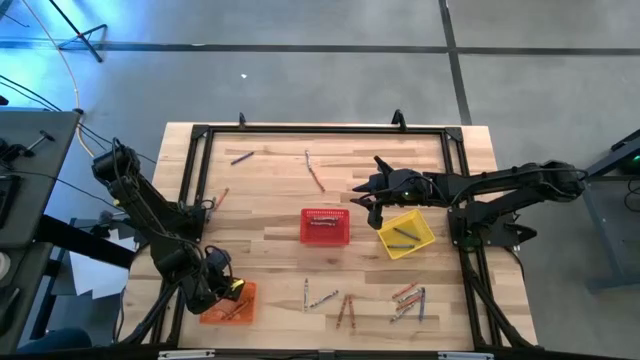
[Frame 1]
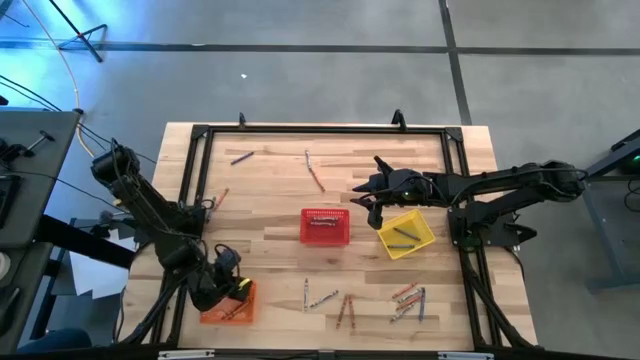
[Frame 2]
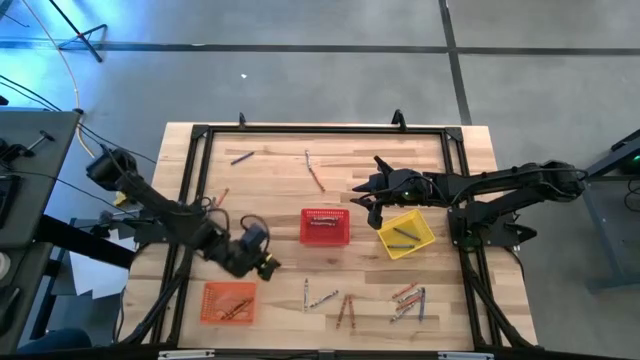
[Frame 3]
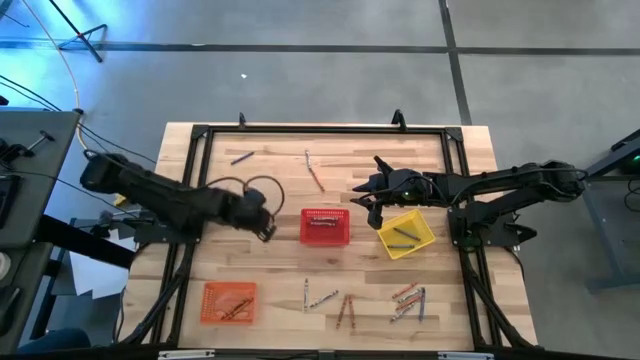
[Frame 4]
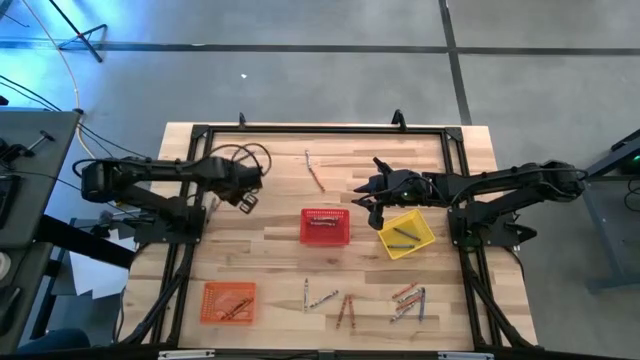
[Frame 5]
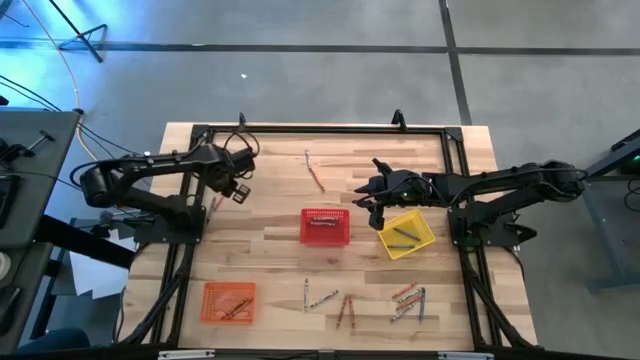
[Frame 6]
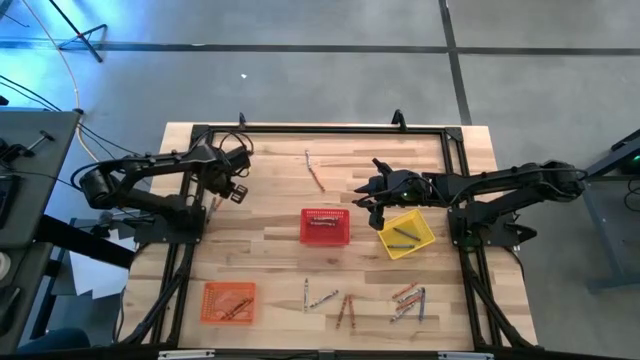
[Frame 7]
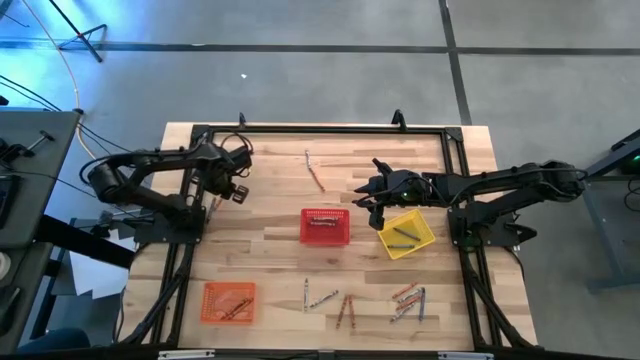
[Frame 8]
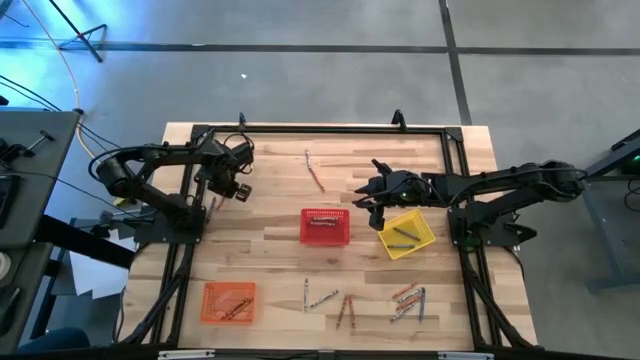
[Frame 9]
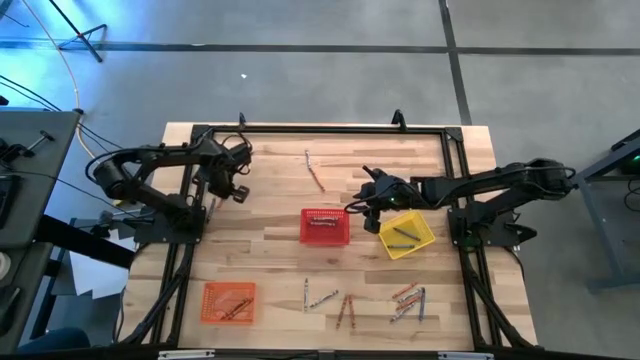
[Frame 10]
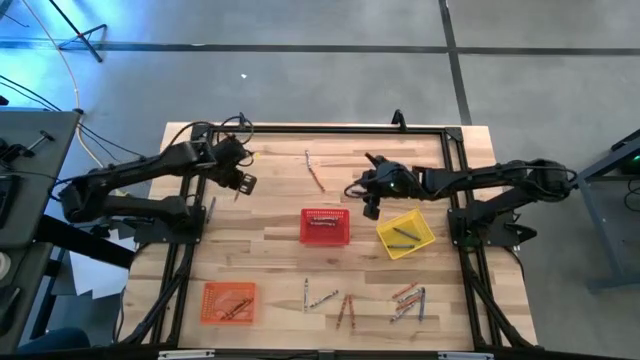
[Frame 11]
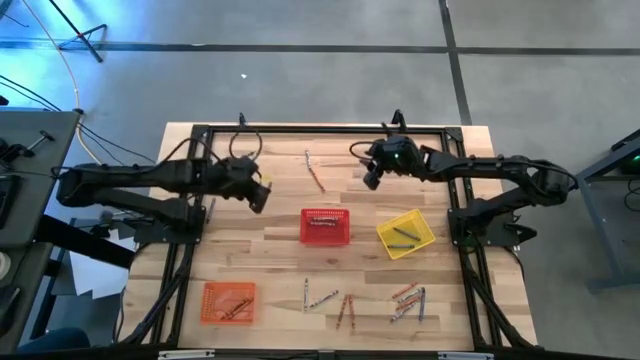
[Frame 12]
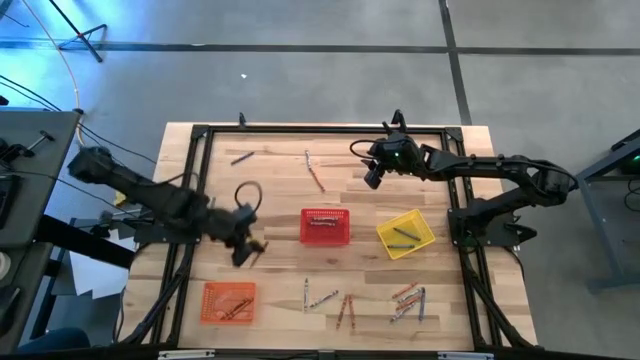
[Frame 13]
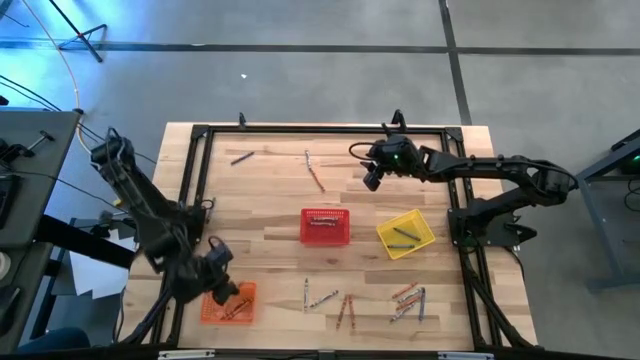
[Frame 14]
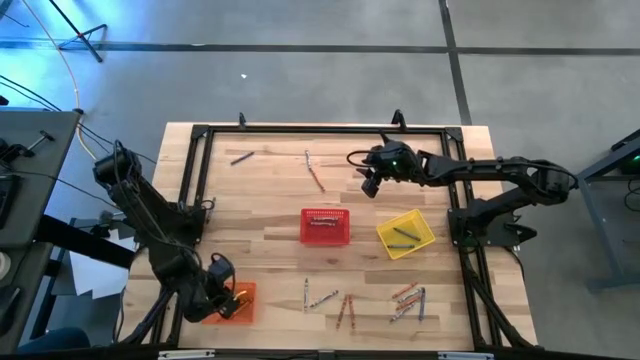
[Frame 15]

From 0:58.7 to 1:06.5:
Task: Sort crayons
Put the orange crayon into the orange bin

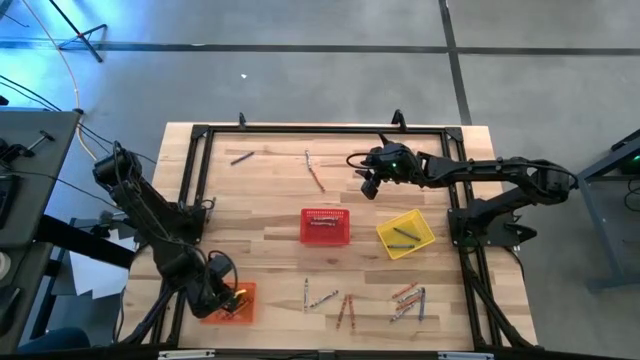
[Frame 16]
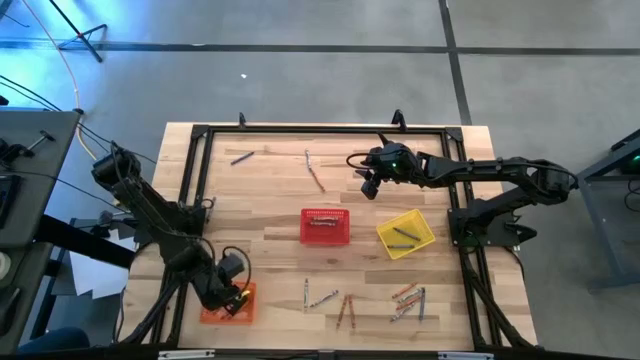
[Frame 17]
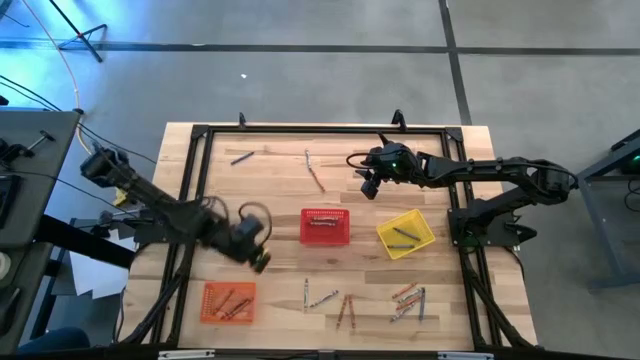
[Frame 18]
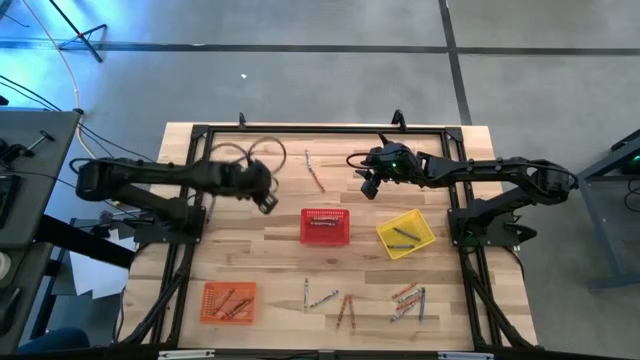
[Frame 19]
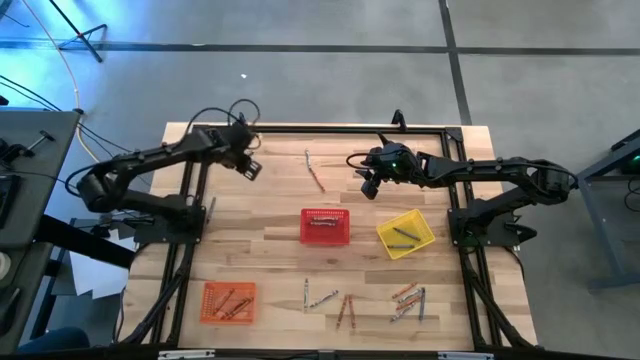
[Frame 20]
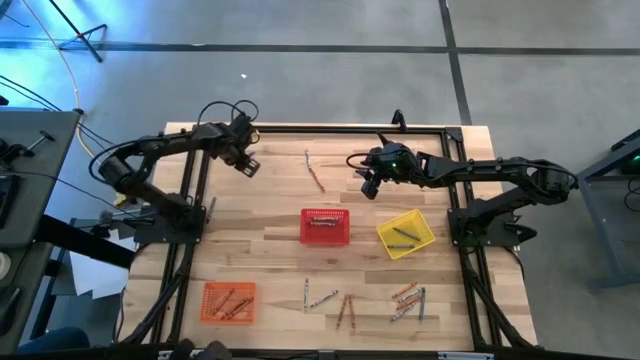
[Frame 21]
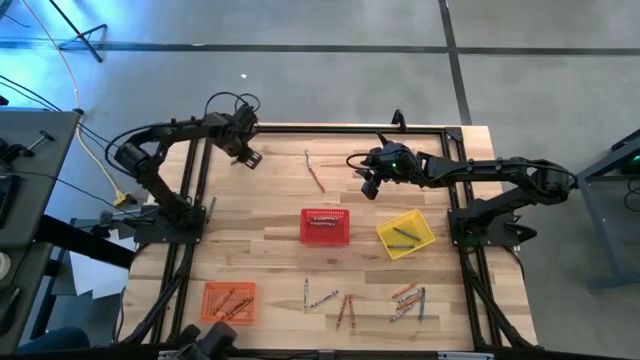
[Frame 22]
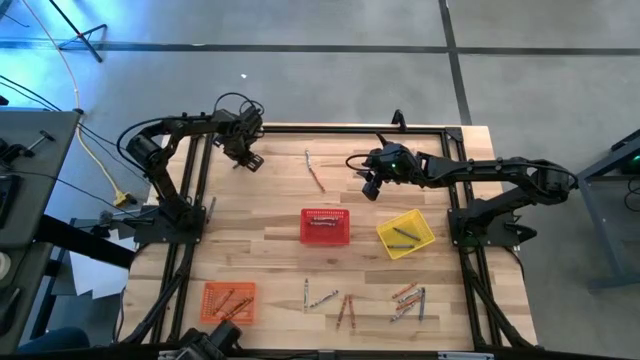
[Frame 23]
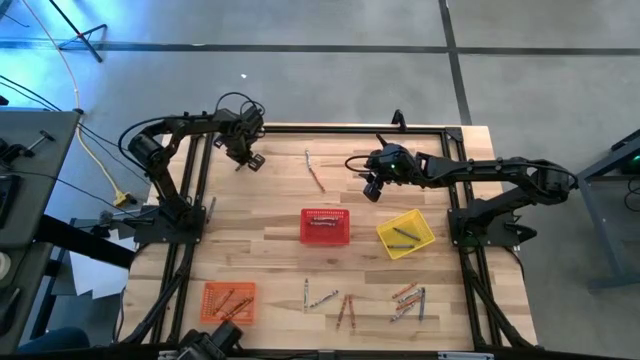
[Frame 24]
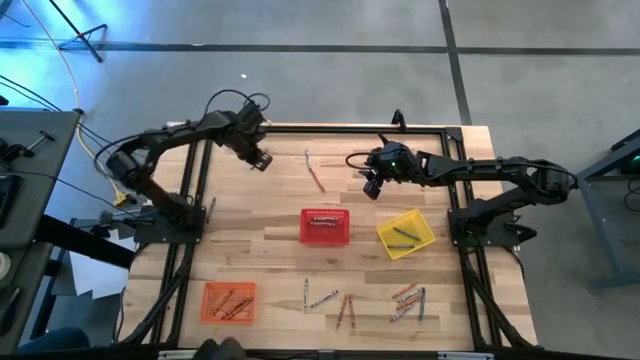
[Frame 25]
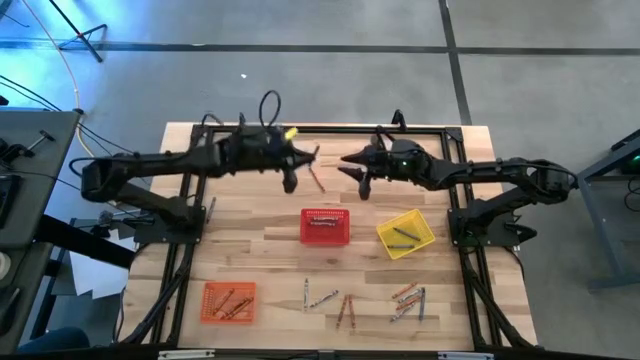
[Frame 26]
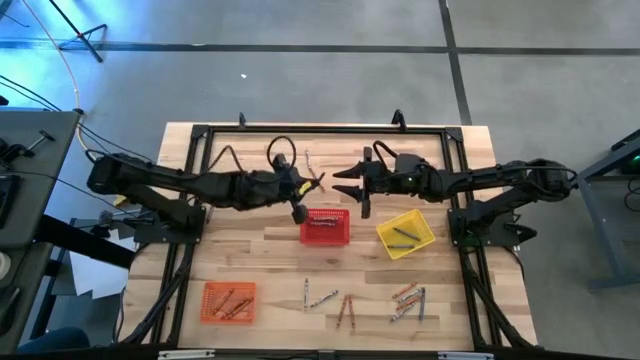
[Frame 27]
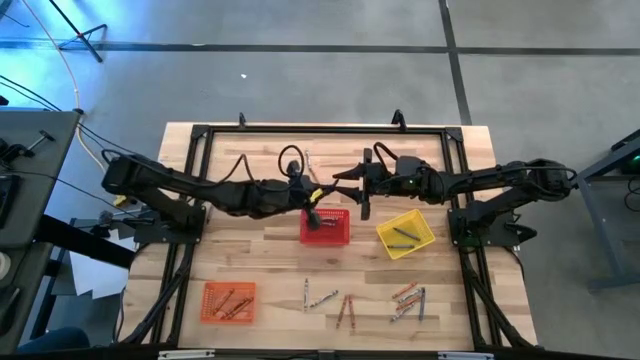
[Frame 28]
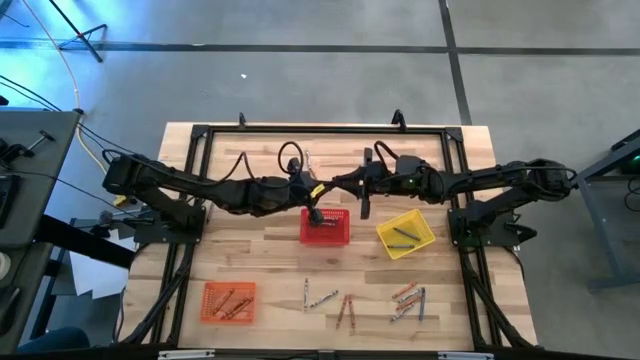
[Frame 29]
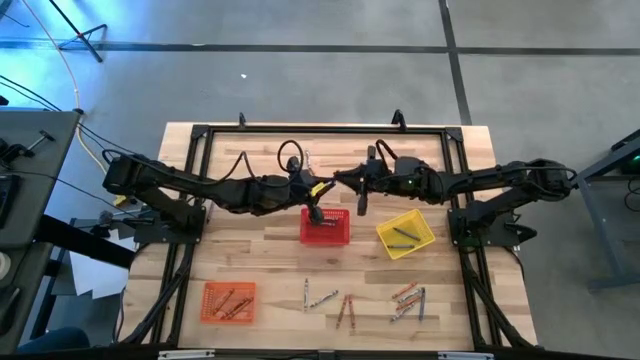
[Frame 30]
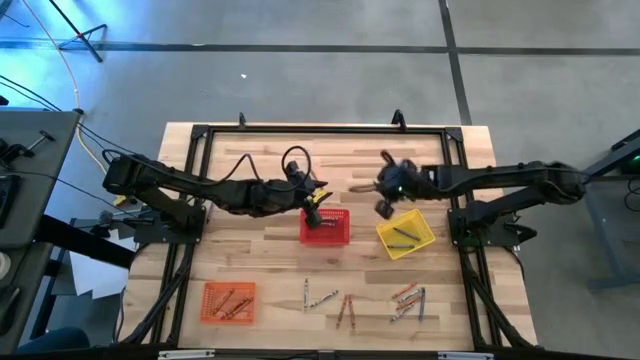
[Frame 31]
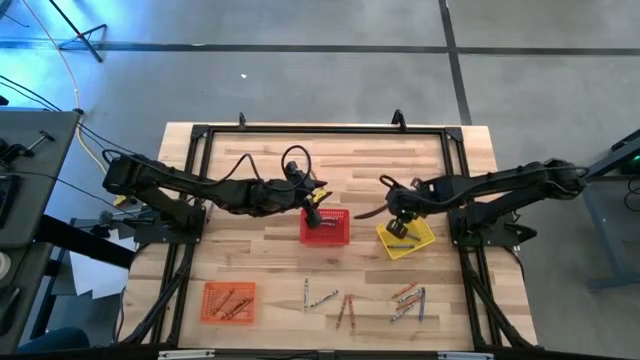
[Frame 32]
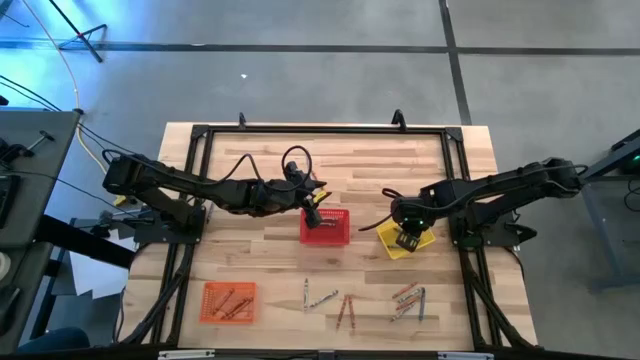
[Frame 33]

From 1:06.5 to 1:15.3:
Put the blue crayon into the yellow bin

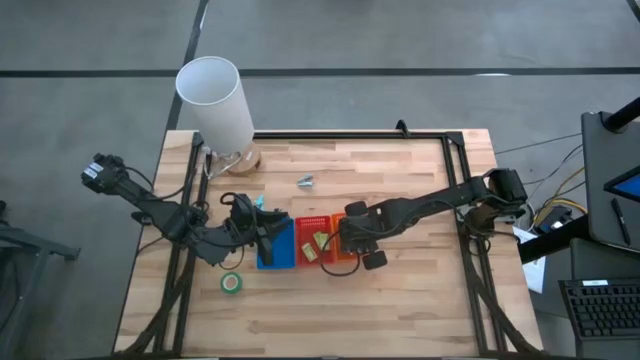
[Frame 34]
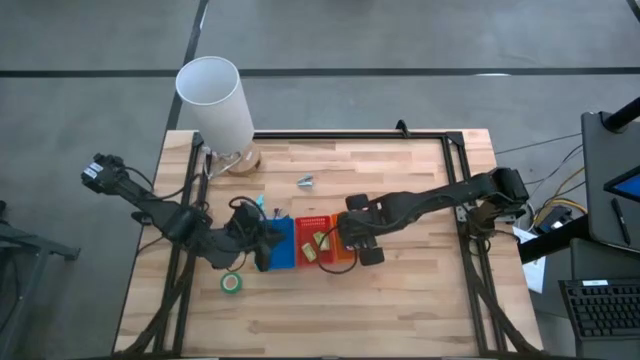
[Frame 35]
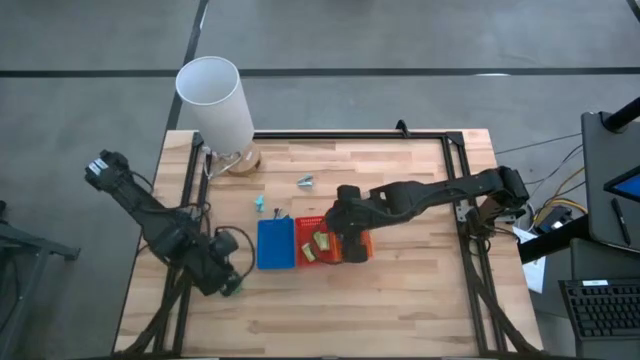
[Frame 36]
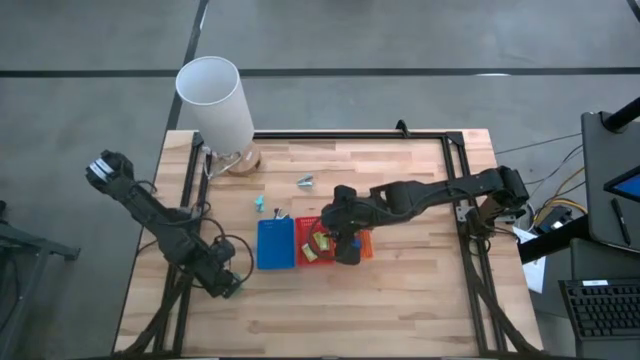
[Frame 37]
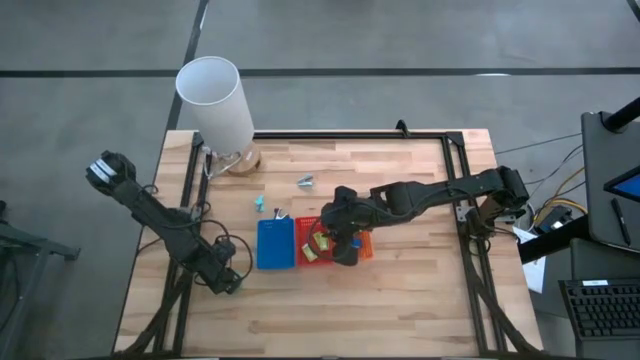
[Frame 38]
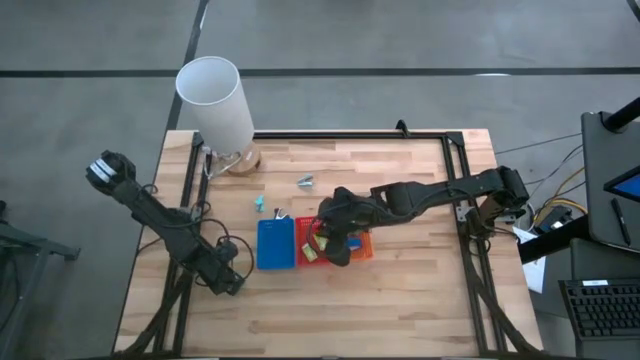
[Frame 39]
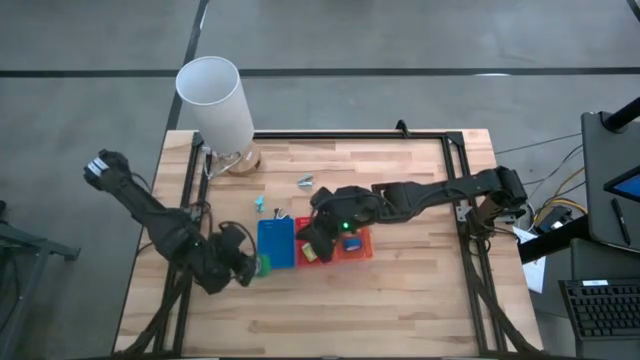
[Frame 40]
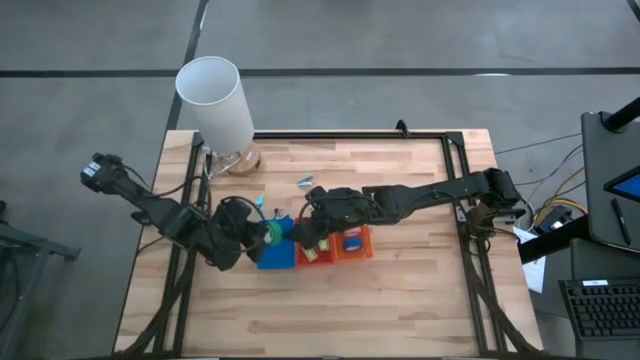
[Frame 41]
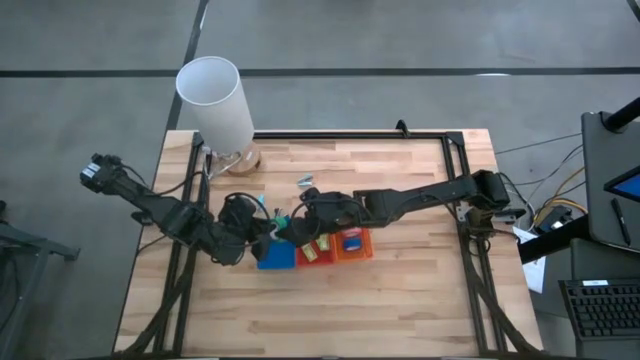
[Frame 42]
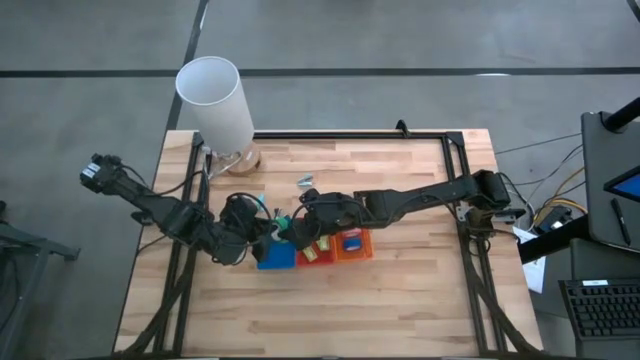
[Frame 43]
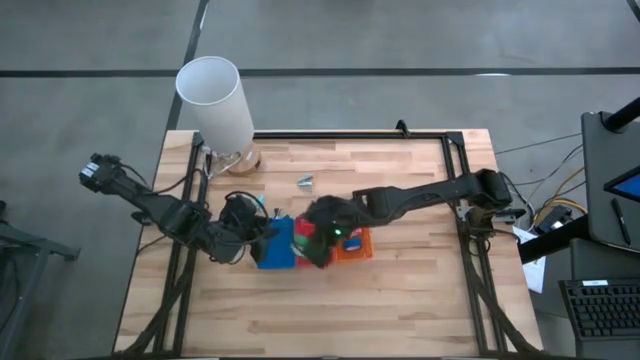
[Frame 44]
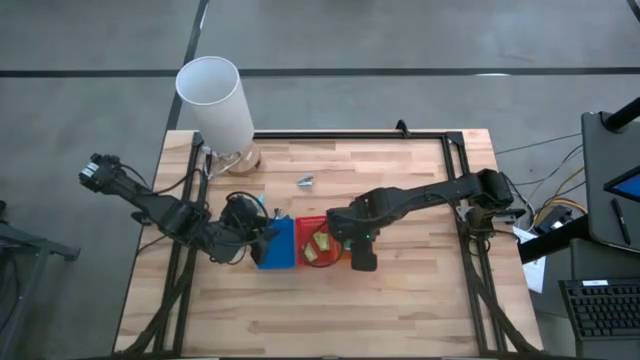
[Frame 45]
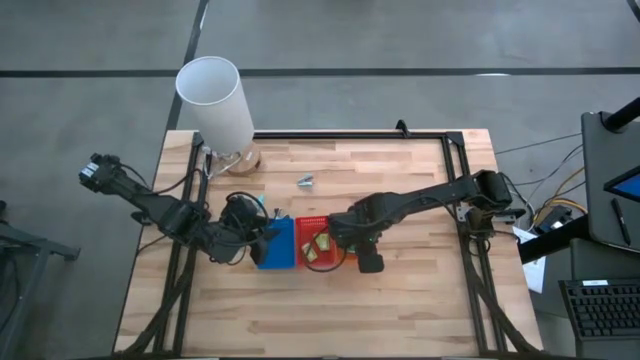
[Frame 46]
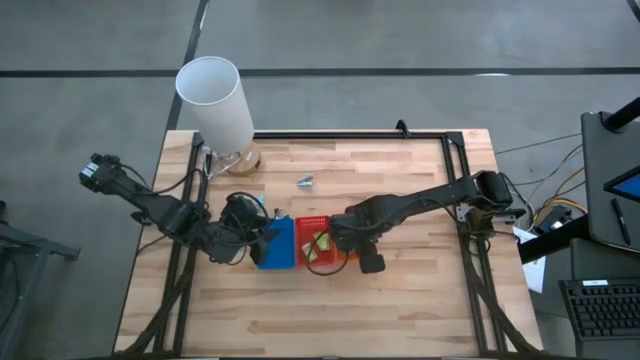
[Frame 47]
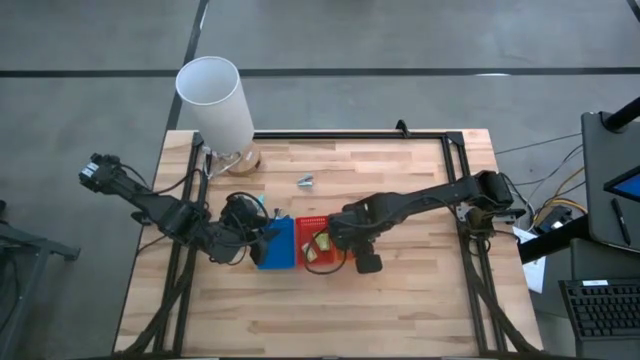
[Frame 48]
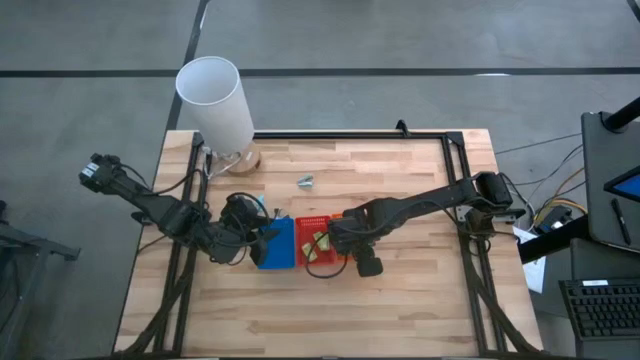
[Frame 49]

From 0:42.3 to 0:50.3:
Task: Pick and place Stapler, Stapler remover, tape
Put the green tape into the orange bin
